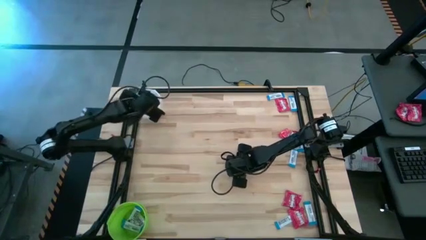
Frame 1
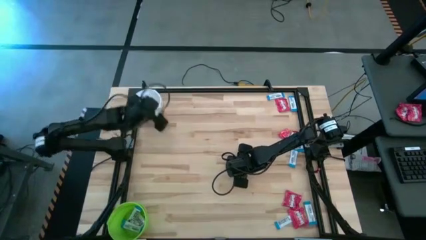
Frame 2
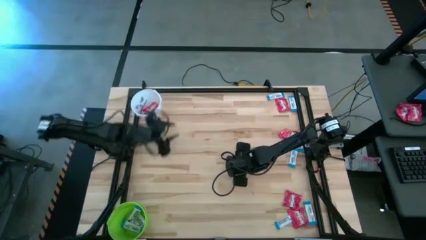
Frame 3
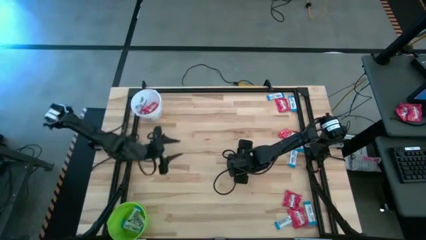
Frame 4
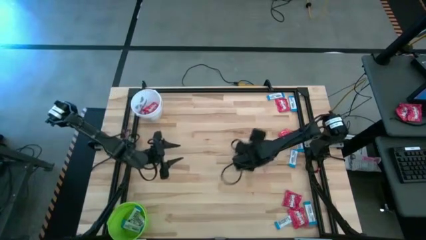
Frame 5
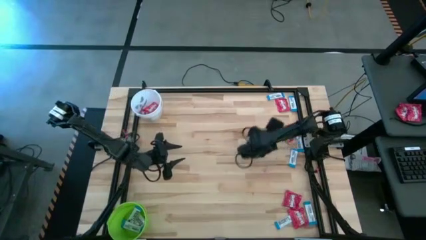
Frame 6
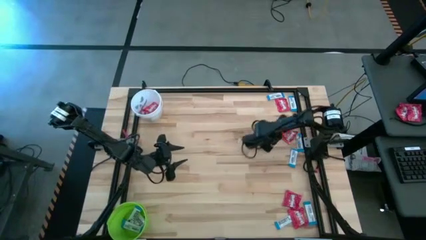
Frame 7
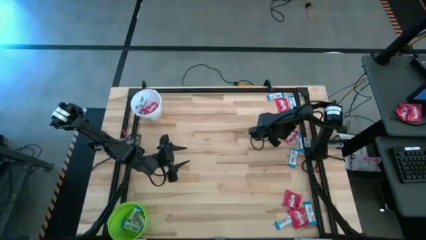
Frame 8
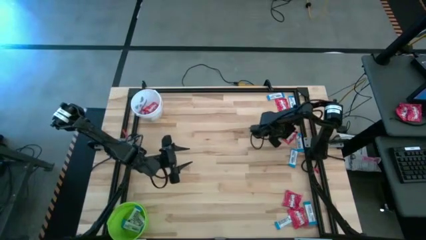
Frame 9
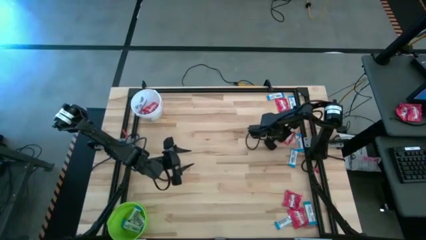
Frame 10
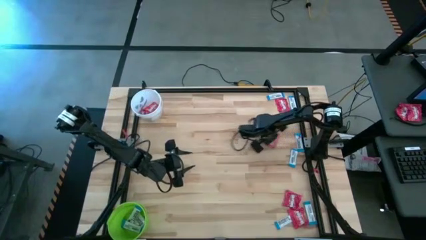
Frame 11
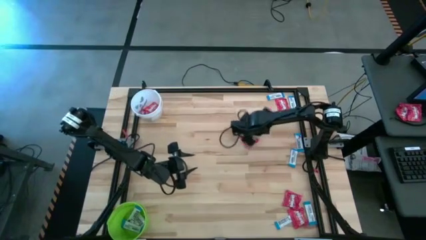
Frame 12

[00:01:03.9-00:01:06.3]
Task: Sort candy by brand, put in halloween buckets
Move the red candy to the center of the table

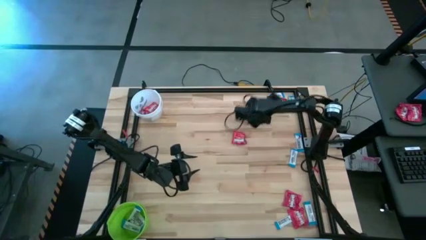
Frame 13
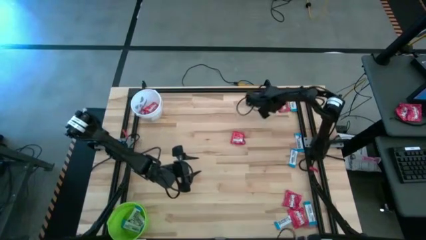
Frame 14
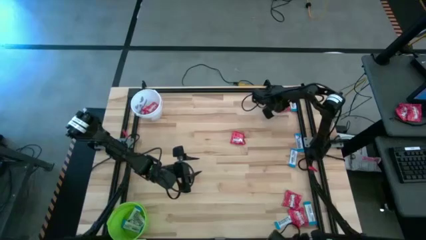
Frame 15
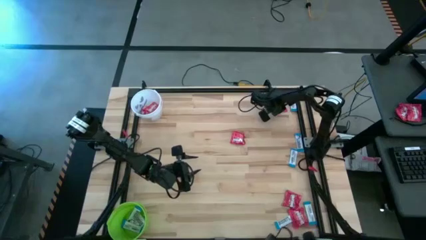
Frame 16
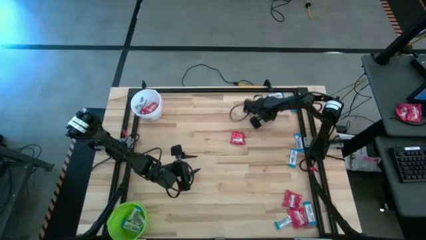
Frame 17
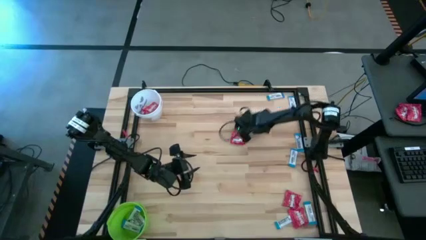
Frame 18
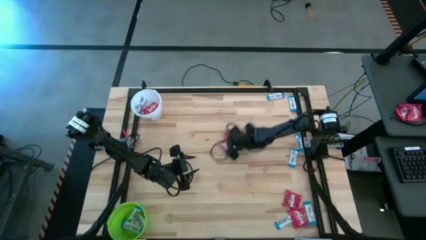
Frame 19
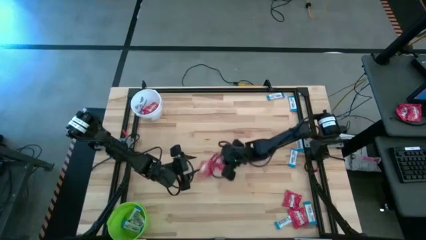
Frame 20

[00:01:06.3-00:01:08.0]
Move the red candy to the center of the table

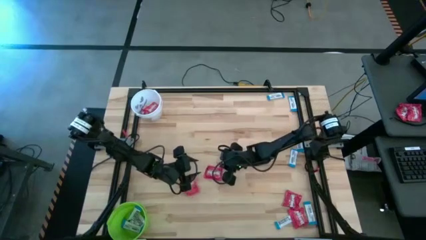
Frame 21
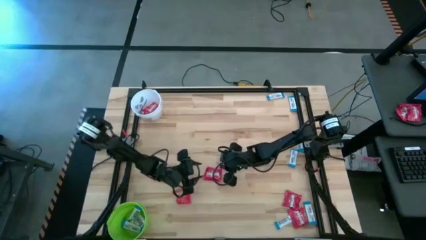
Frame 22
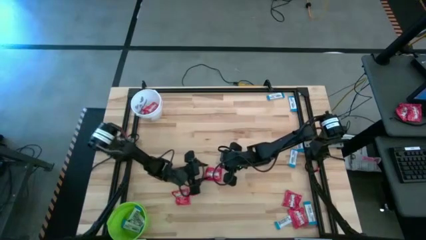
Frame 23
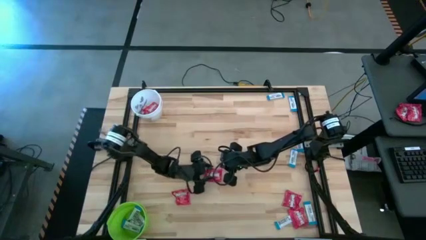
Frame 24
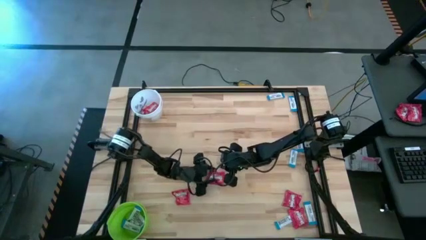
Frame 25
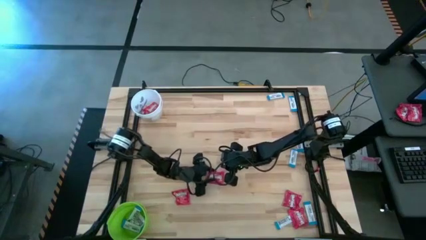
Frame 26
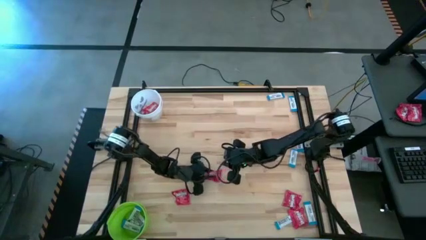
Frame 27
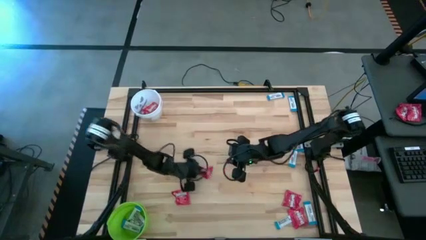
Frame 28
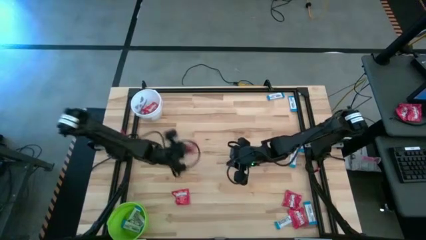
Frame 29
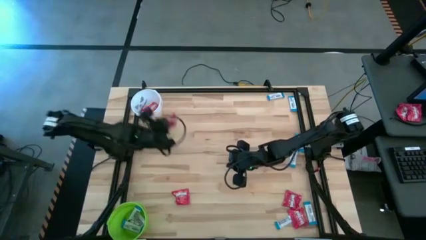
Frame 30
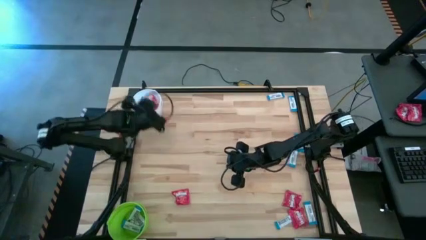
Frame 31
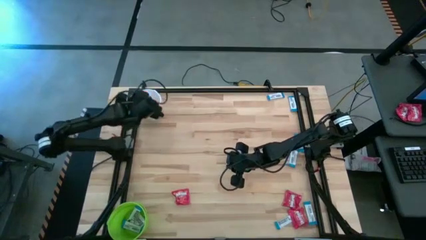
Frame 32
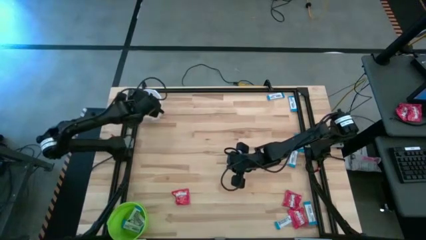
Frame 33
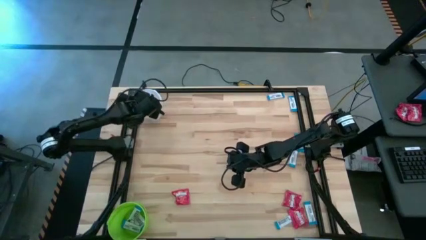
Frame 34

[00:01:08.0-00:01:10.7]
Put the red candy into the white bucket

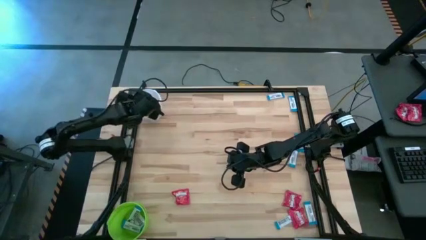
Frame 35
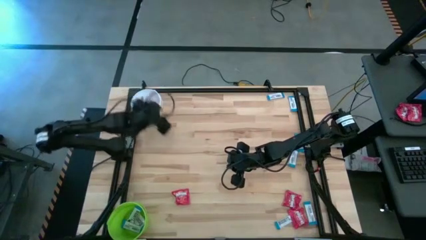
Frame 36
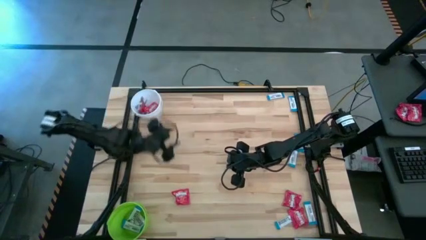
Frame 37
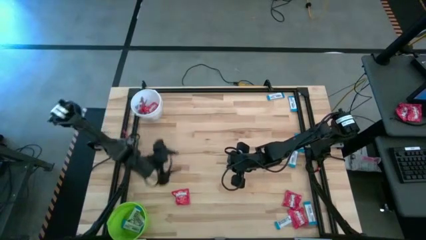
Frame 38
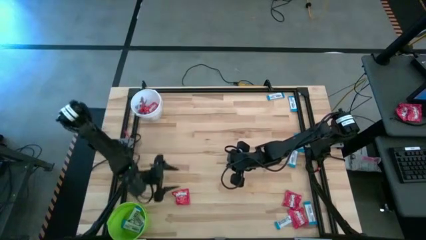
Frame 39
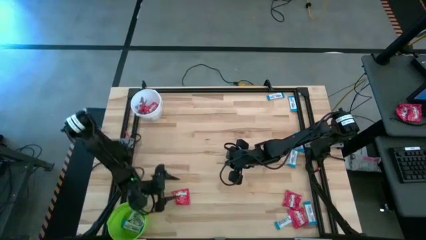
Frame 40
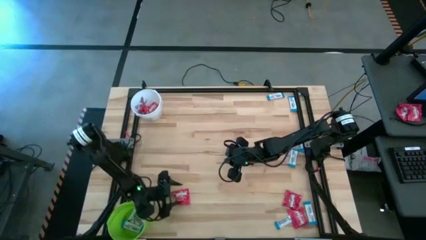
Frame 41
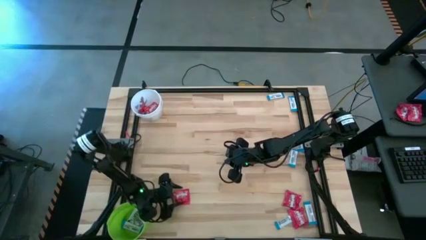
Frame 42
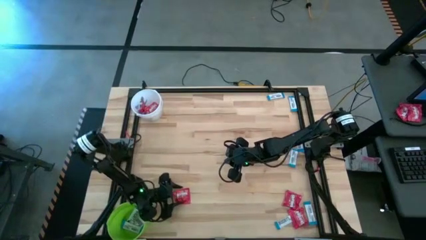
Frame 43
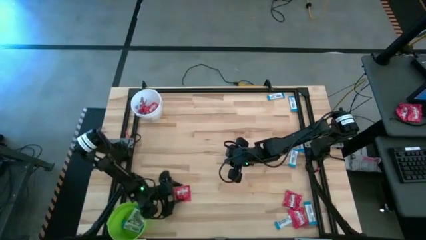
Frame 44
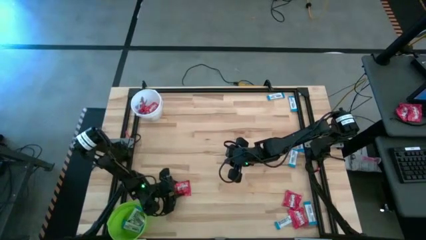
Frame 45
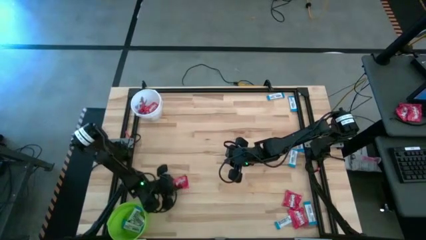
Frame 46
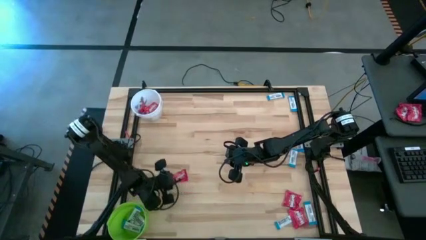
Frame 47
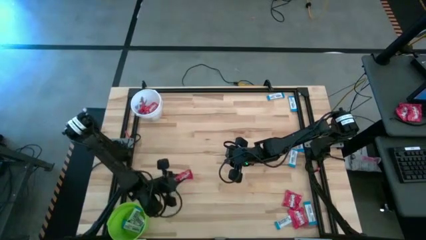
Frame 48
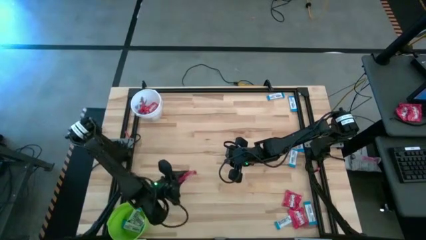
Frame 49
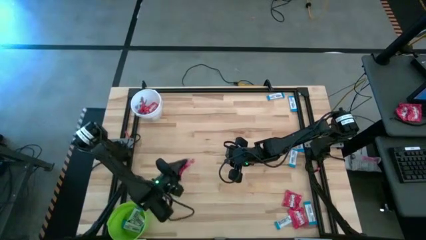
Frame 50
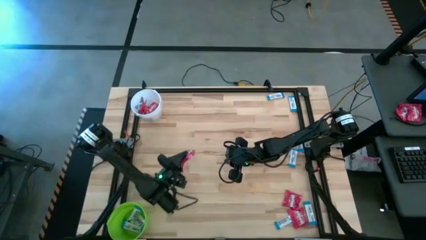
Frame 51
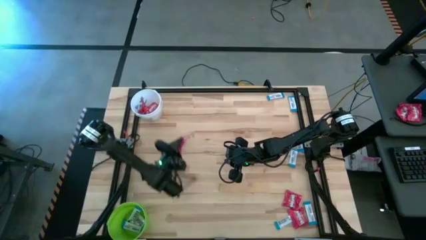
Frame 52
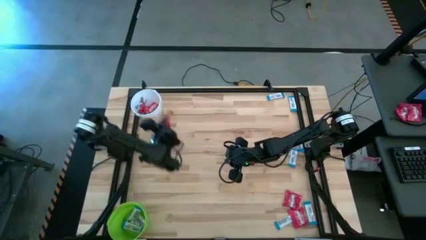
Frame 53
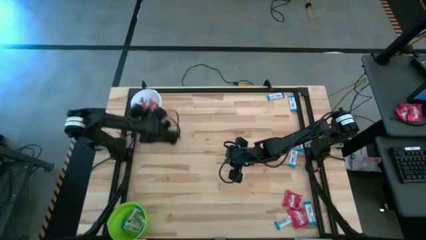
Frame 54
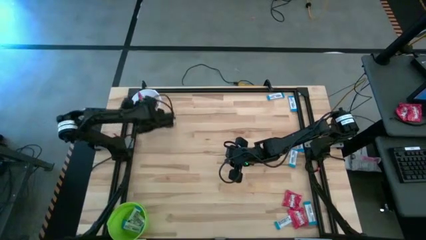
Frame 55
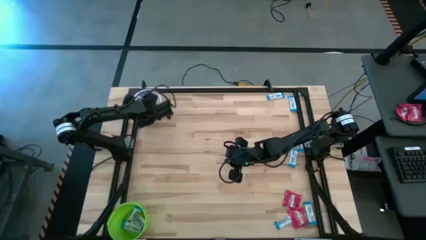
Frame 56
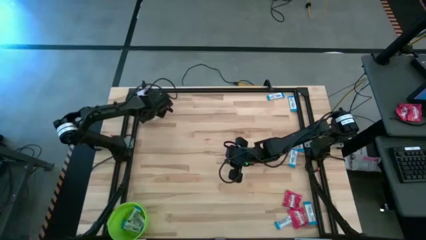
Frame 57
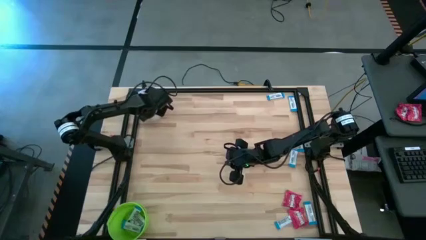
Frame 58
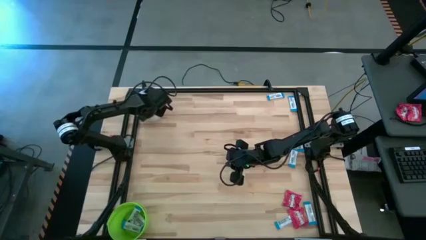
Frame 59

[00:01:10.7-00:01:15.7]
Put the left red candy into the white bucket

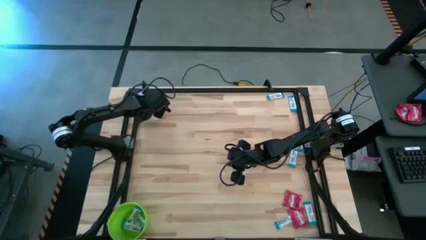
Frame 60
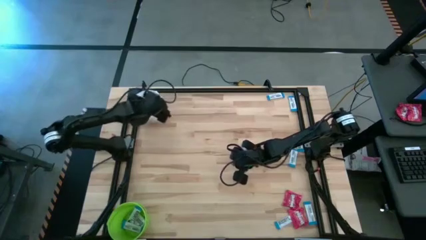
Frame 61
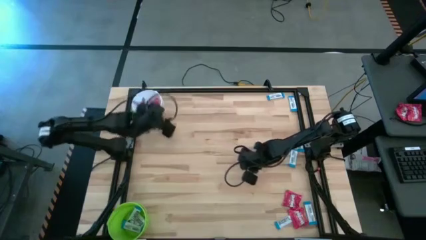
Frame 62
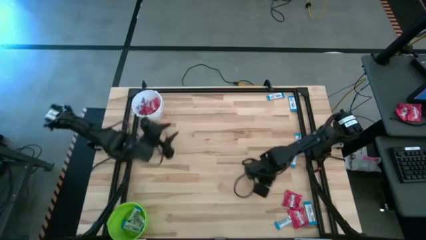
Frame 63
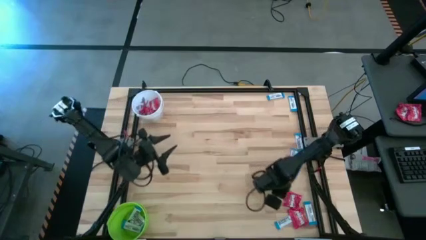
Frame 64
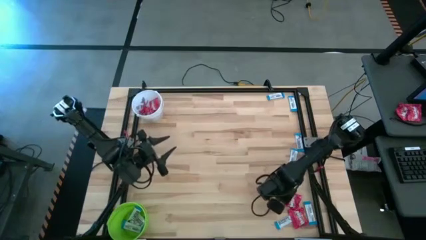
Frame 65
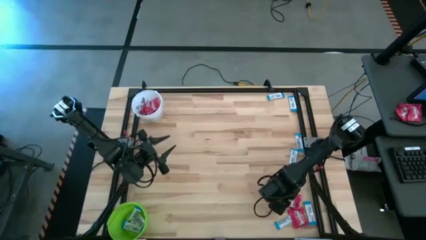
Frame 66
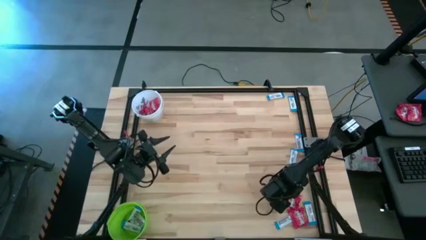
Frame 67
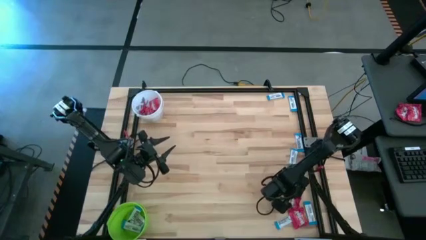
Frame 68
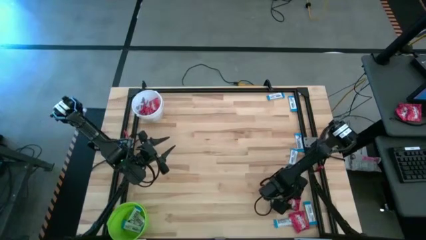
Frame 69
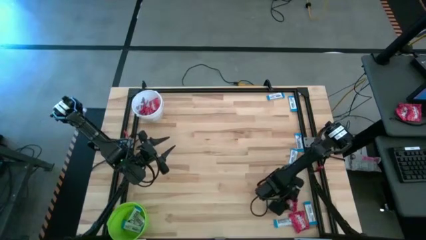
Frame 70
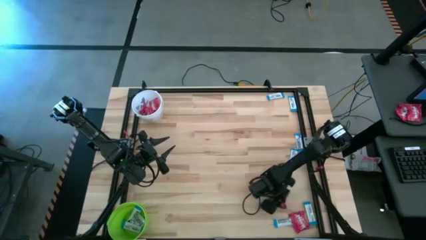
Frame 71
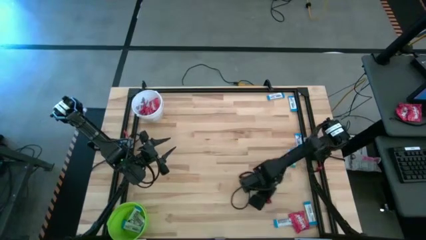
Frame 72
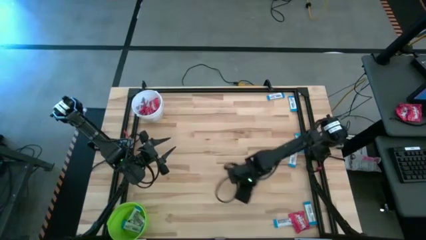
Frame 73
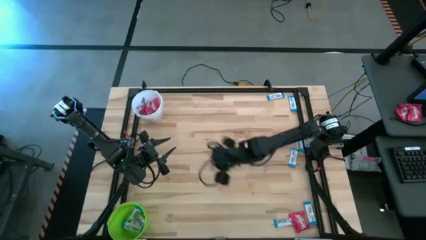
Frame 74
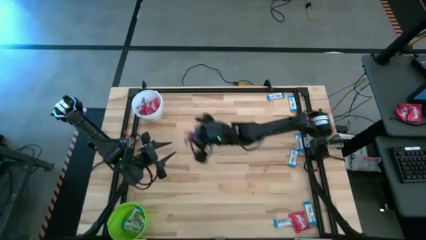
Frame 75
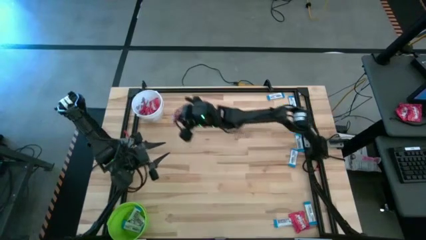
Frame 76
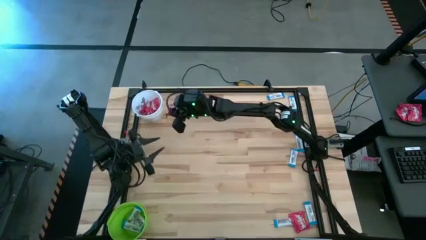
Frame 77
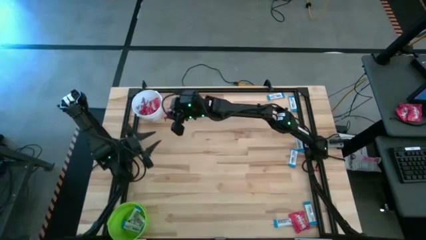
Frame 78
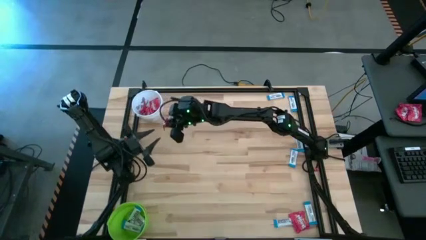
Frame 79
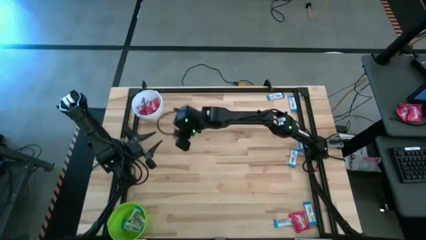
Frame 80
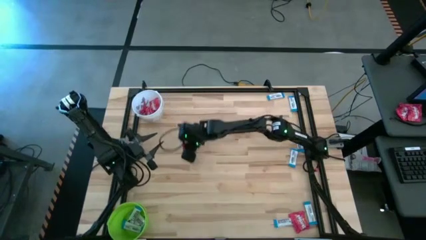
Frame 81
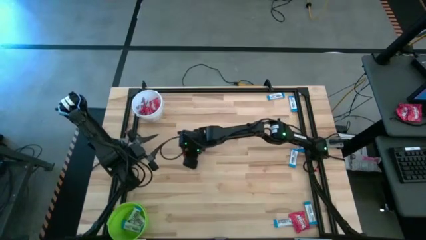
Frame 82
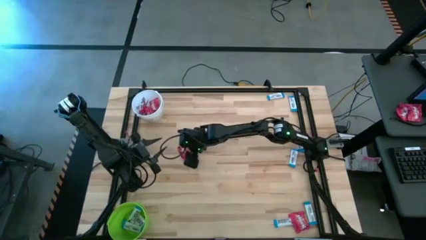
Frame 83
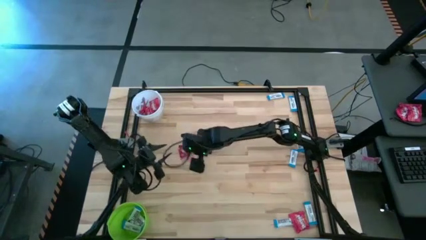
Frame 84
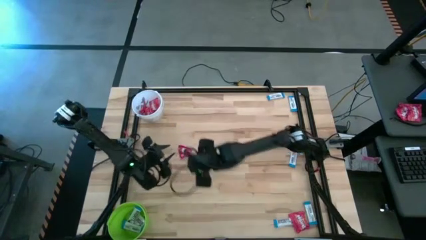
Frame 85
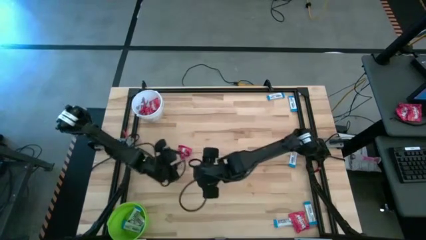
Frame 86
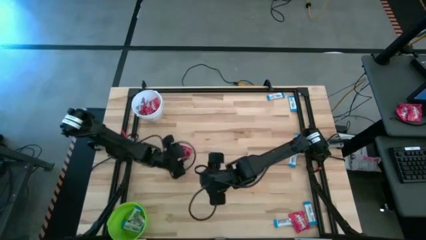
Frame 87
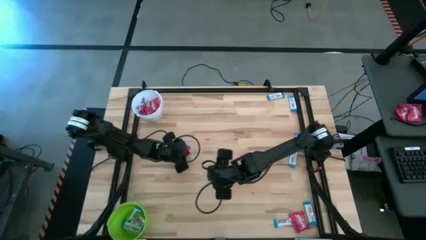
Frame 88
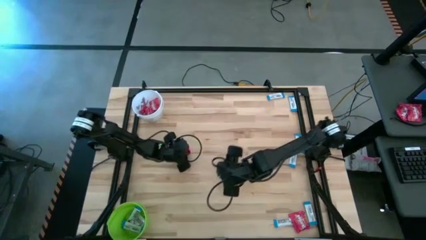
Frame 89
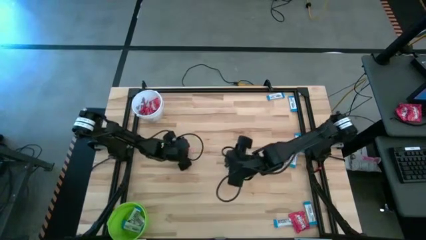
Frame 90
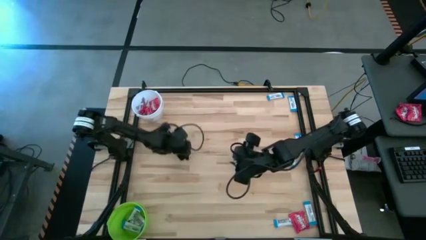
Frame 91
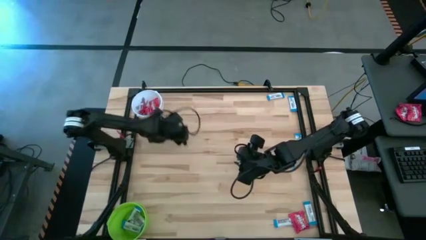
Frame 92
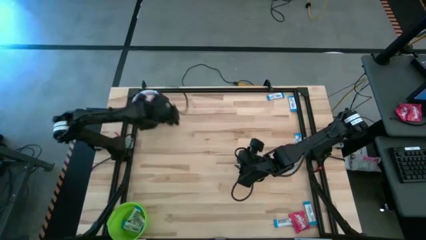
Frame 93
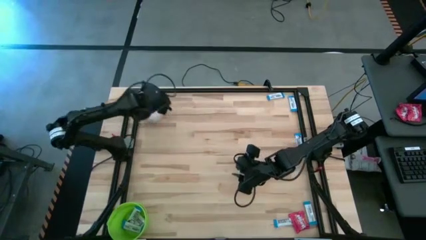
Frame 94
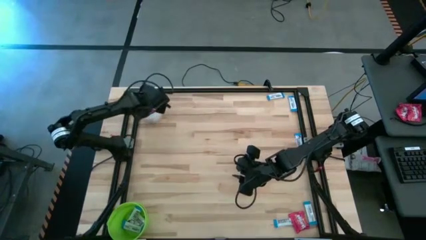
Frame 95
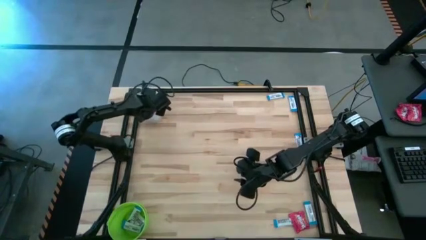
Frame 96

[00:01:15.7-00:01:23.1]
Put the top red candy into the white bucket
